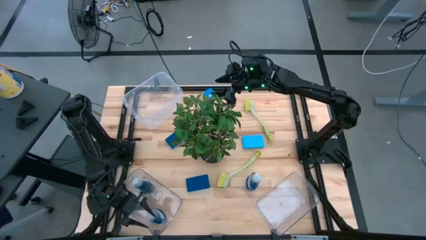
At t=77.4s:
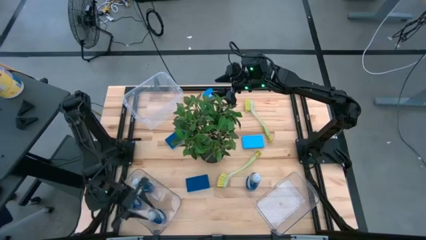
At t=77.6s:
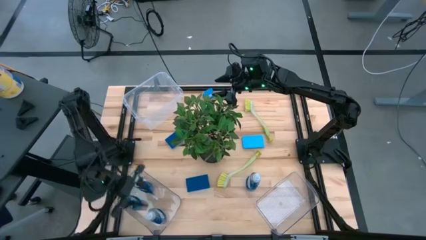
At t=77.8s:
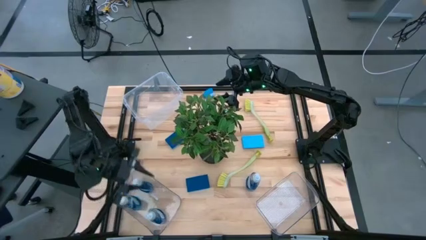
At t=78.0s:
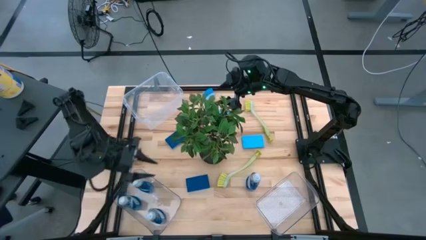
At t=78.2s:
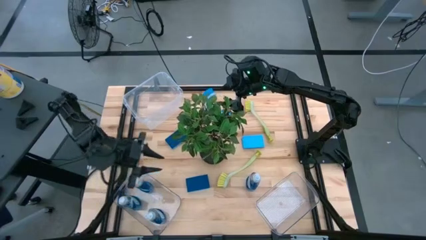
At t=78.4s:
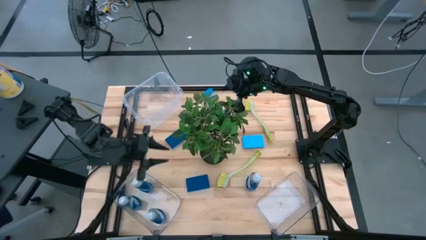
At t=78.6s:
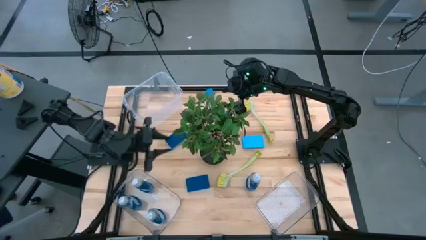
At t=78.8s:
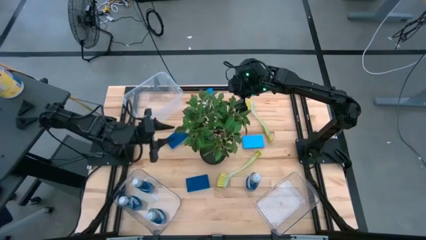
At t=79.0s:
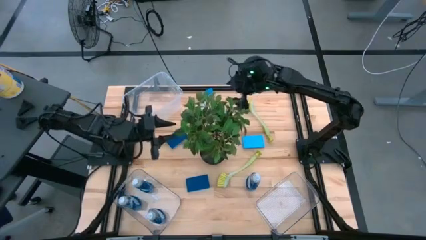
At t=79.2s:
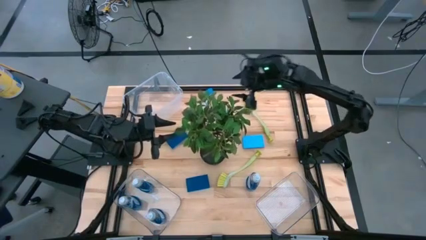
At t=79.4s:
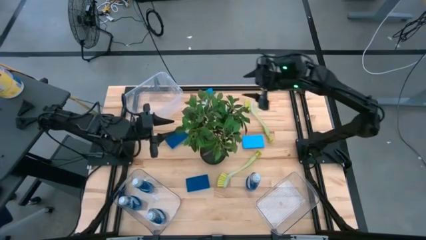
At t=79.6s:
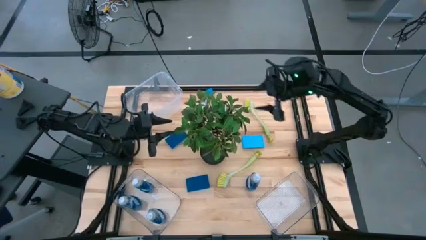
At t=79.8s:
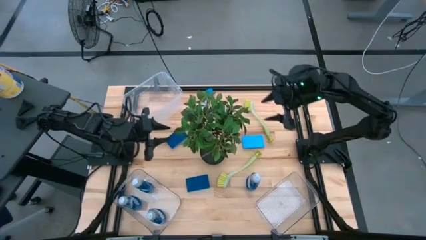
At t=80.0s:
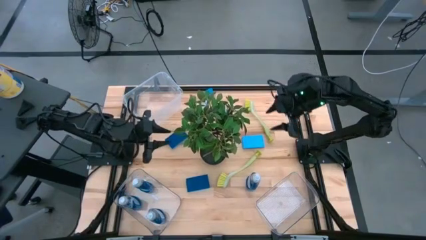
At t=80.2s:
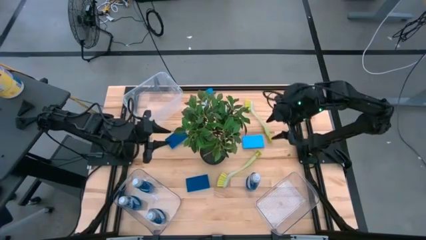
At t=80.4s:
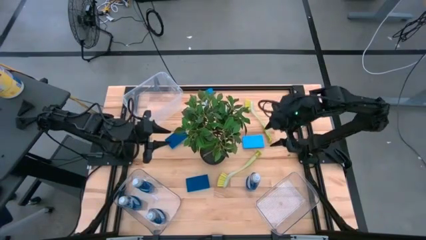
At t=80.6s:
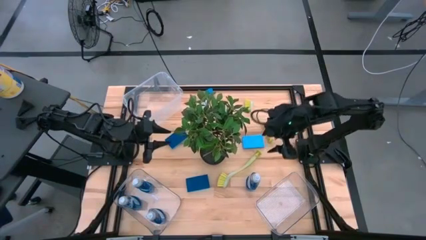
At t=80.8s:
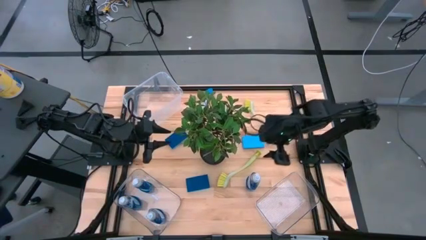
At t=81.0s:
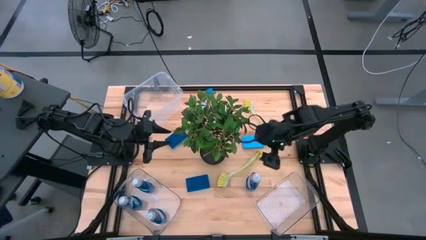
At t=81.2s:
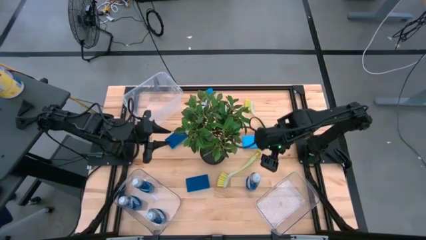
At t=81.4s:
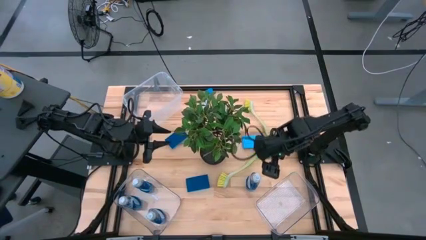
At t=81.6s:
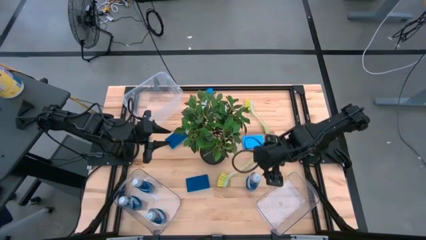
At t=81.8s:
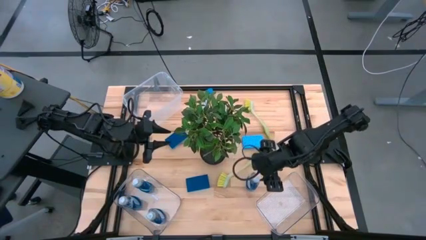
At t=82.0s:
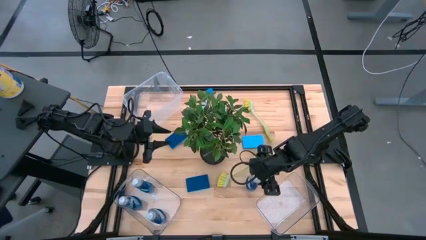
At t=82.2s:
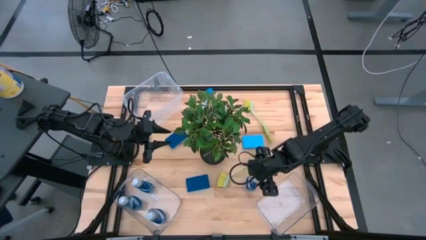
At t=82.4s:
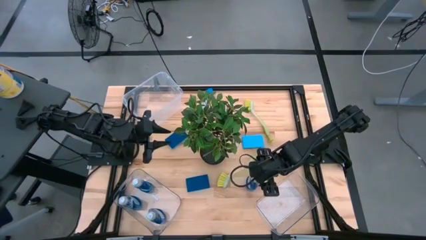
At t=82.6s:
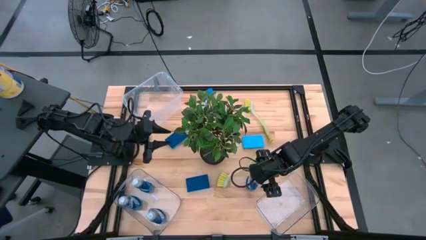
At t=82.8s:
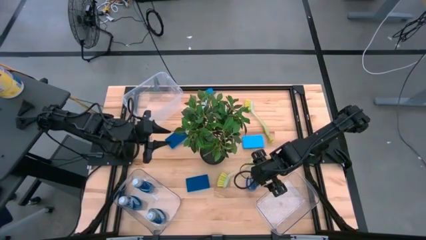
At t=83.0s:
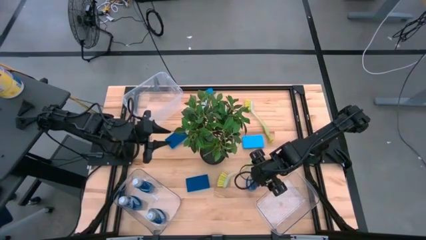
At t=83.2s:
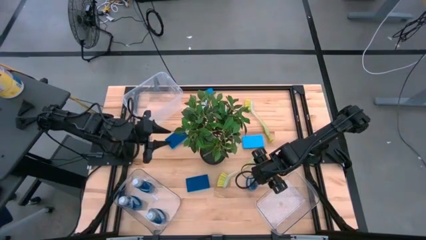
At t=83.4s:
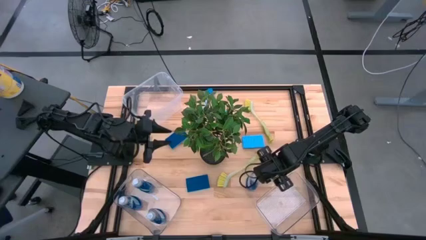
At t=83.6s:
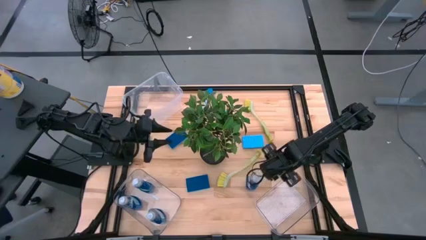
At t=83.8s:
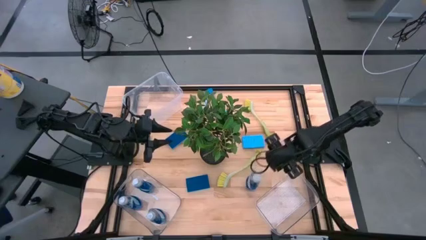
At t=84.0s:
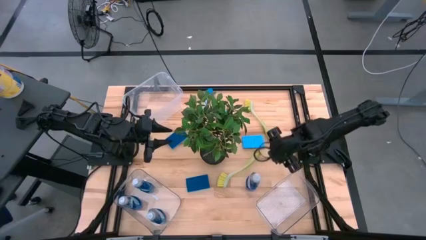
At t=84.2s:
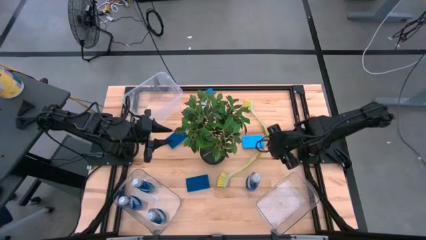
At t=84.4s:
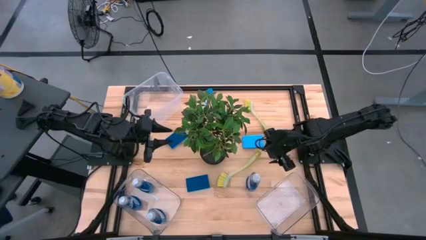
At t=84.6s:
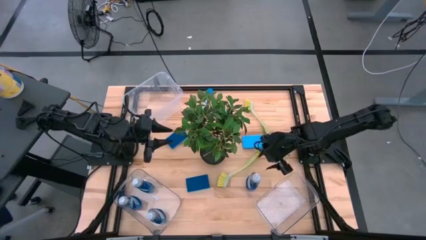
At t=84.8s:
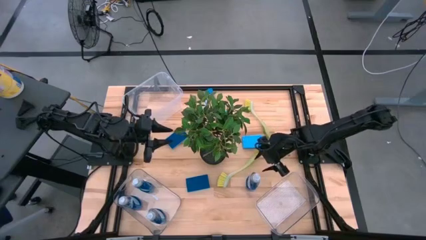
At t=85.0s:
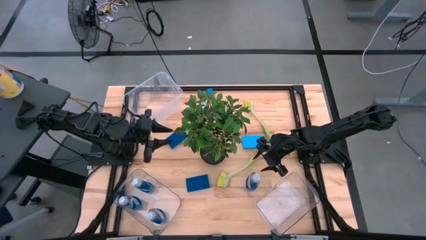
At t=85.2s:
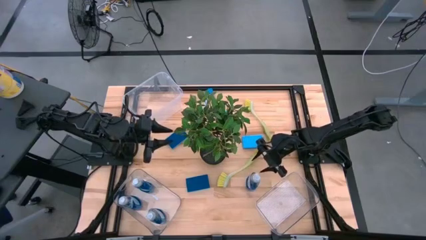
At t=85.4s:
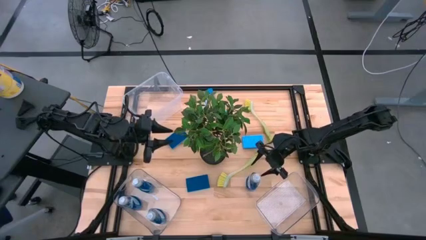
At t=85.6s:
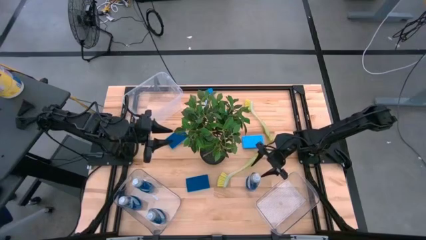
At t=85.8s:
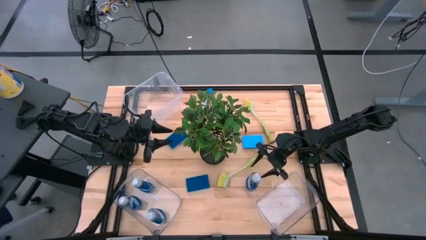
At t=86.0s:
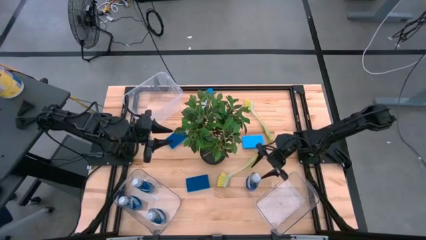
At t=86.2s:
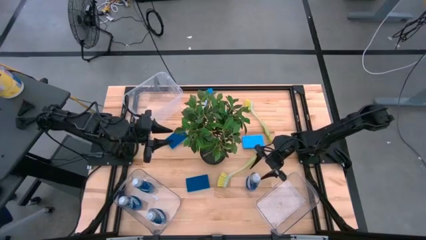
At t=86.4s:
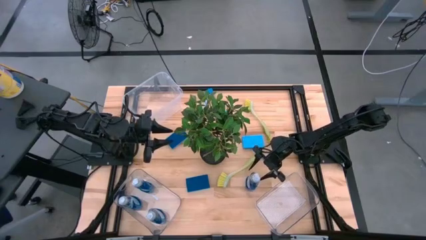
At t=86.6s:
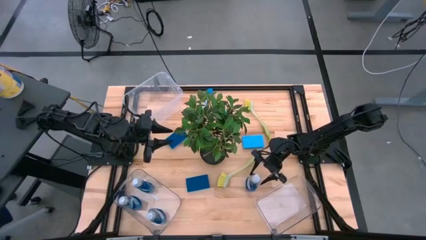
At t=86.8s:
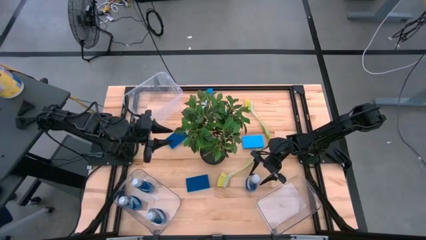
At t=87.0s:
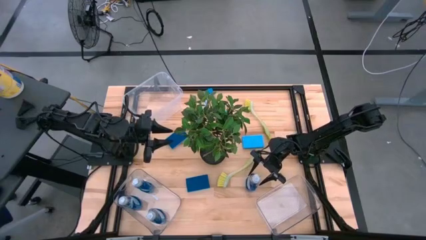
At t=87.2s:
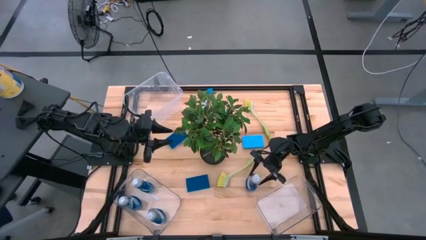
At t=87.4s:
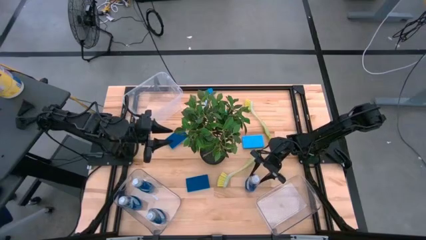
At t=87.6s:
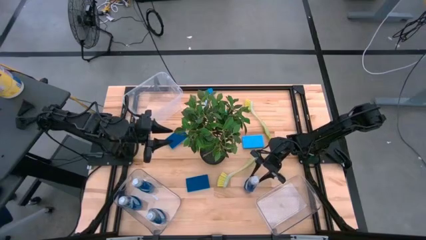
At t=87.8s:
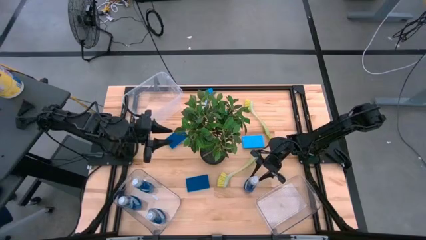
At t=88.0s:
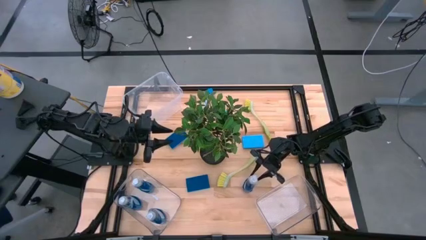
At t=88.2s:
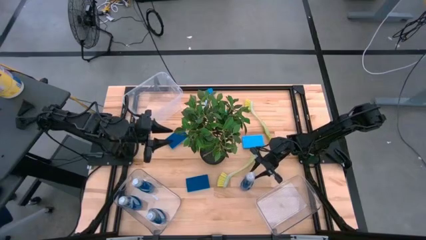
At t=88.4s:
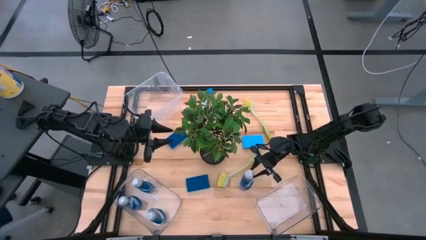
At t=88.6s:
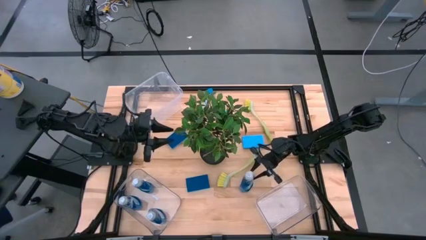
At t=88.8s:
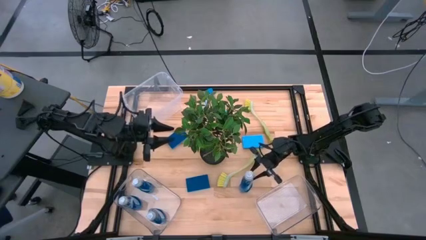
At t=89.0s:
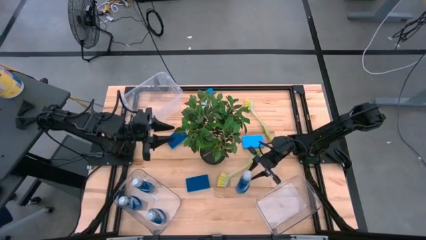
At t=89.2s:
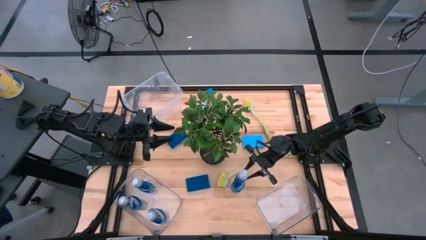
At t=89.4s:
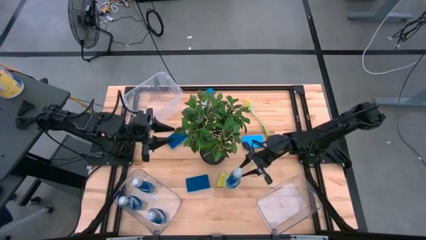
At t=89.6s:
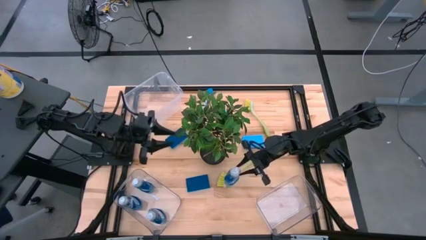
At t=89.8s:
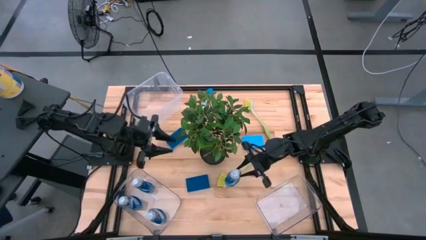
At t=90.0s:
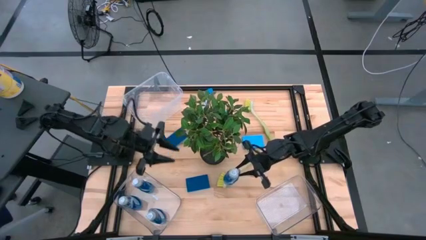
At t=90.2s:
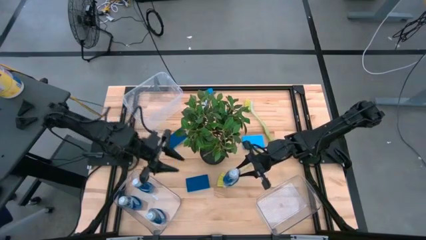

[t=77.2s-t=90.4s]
Task: Pick & Place Kitchen Sink Supplies
Put the blue liquid soap bottle into the bottom left transparent bin

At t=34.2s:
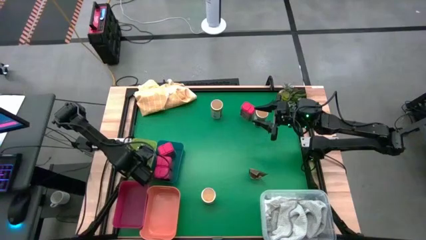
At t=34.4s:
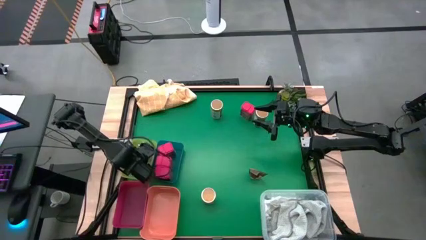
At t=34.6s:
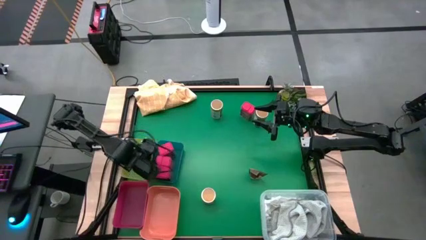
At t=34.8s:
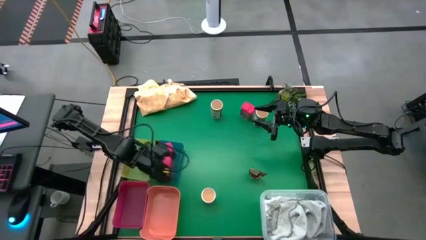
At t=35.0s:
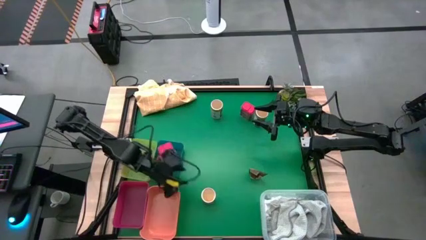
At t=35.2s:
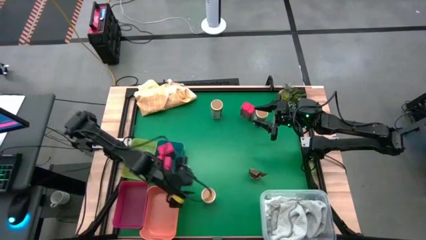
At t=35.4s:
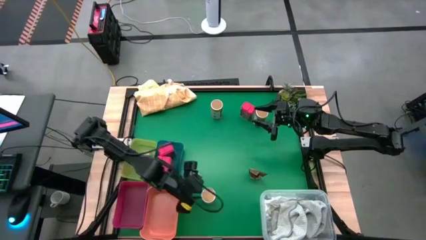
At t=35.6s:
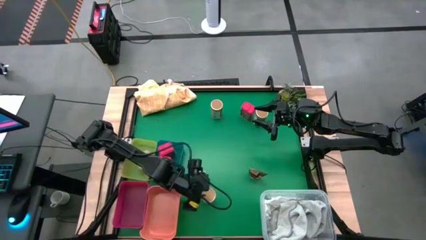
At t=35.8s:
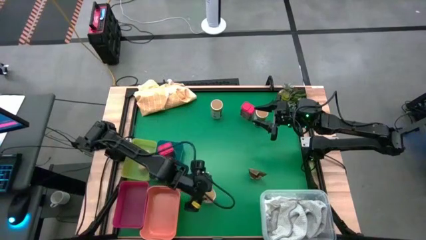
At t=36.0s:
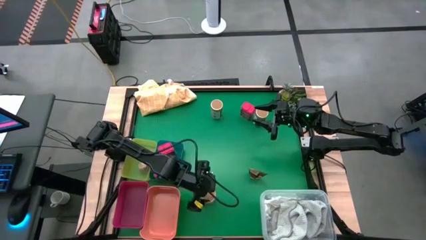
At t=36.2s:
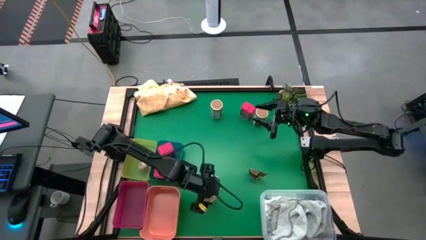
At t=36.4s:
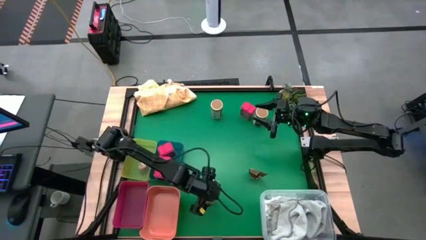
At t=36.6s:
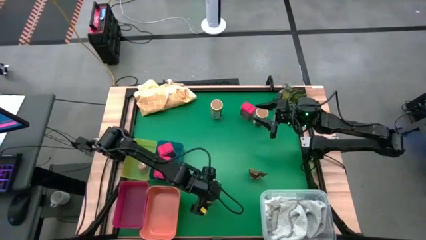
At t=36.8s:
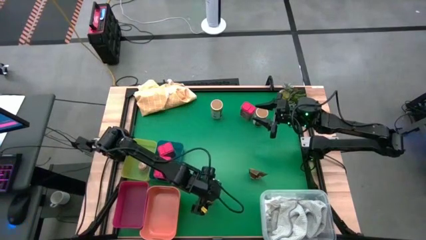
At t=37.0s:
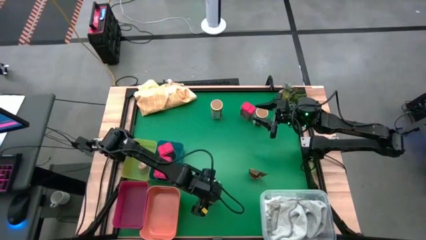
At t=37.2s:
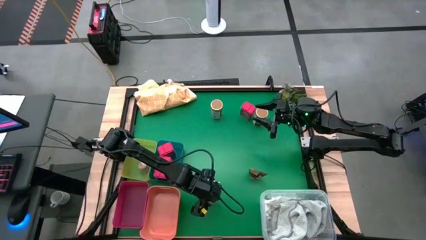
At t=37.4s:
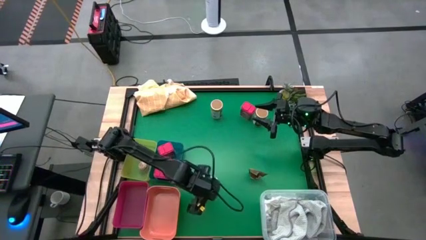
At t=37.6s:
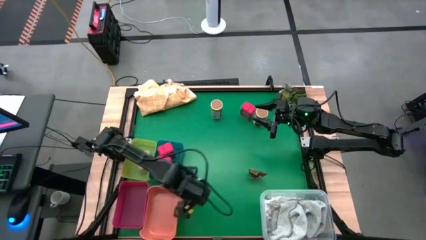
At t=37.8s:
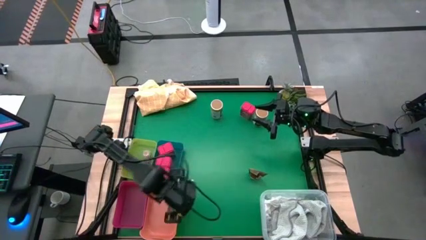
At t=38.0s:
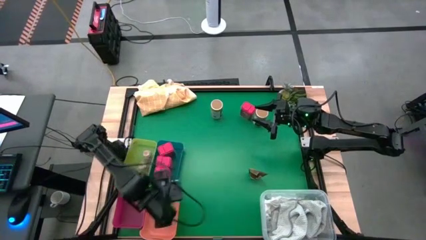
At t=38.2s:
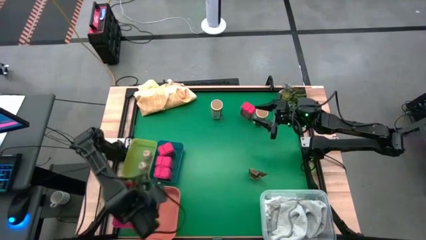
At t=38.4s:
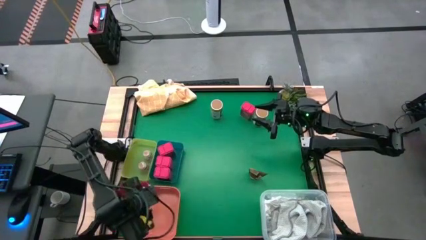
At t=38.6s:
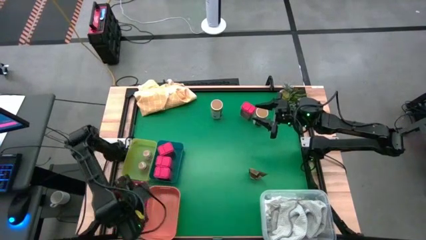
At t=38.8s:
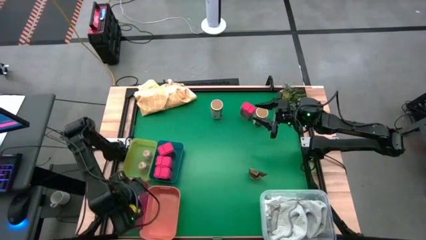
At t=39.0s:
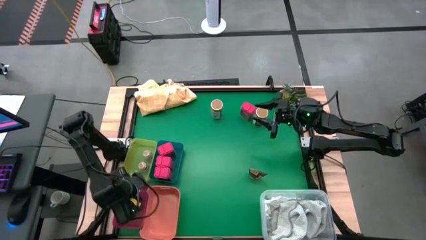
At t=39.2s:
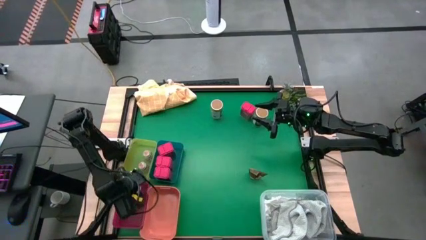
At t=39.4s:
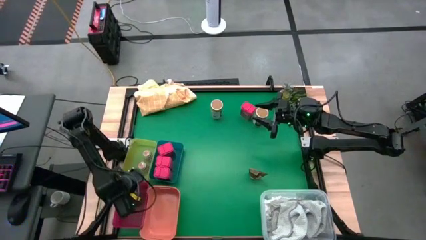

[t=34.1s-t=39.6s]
Task: Sort spices by type
Put the gold seasoning bottle into the red bin
